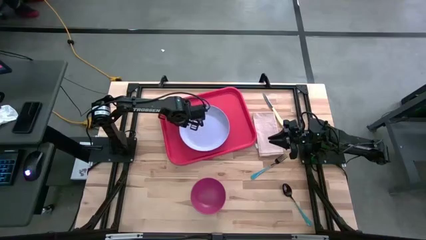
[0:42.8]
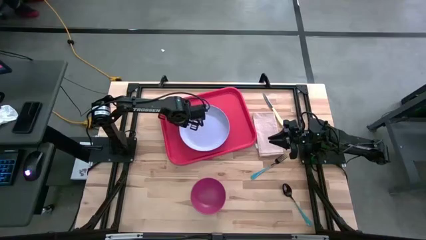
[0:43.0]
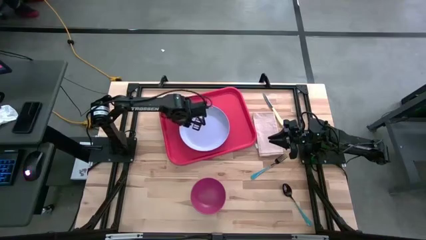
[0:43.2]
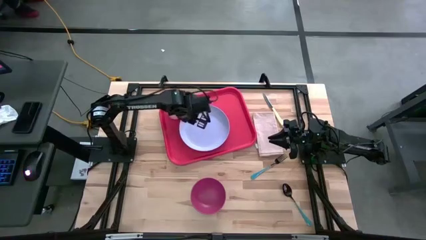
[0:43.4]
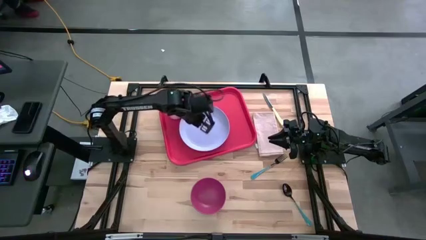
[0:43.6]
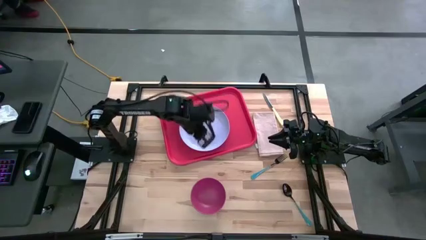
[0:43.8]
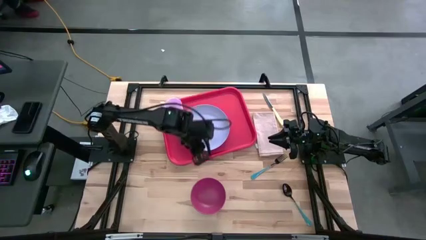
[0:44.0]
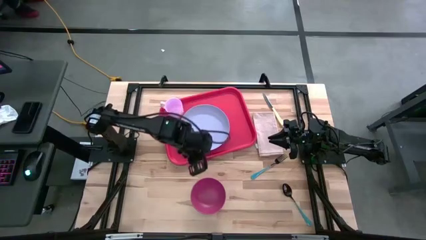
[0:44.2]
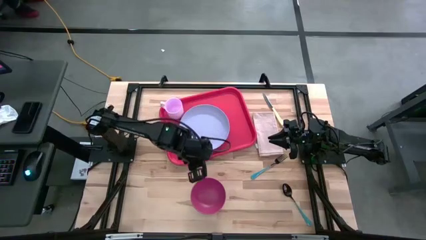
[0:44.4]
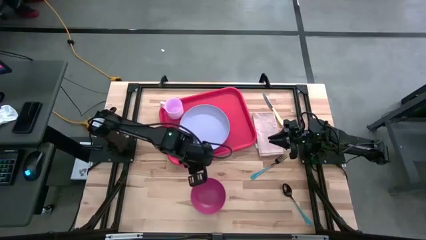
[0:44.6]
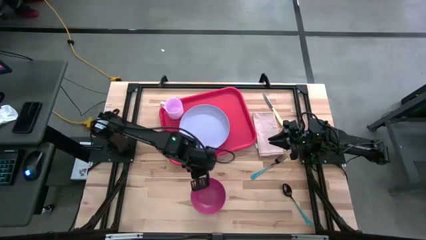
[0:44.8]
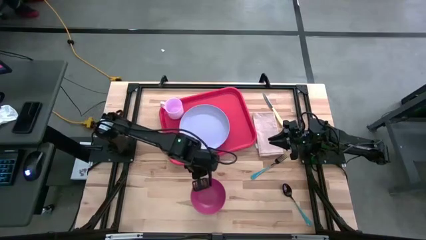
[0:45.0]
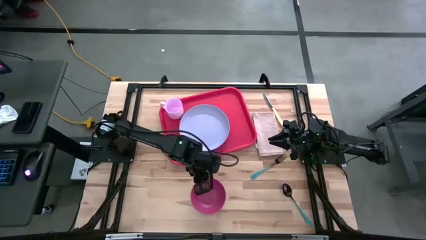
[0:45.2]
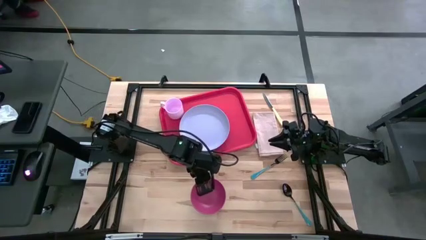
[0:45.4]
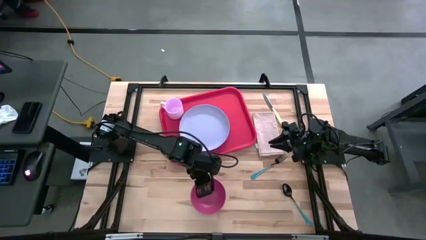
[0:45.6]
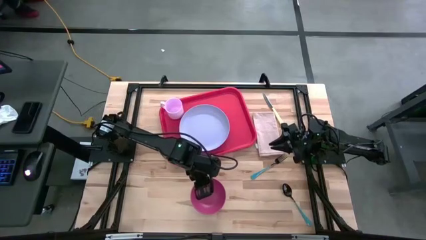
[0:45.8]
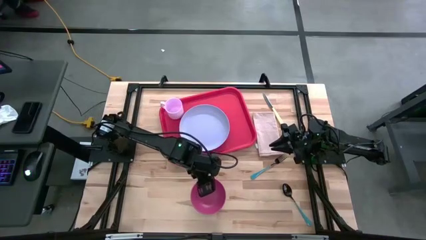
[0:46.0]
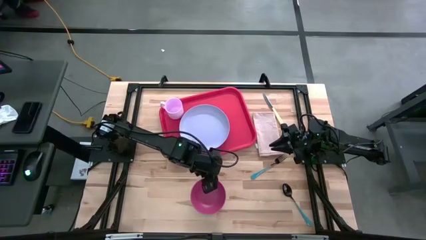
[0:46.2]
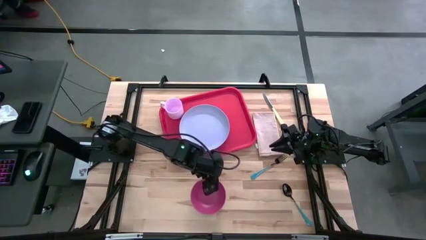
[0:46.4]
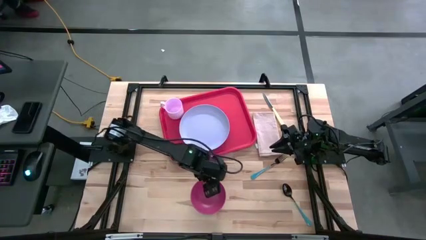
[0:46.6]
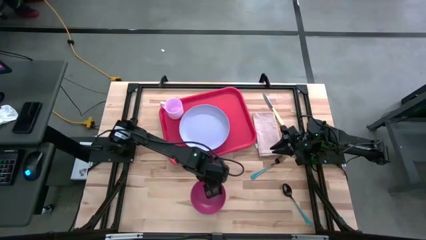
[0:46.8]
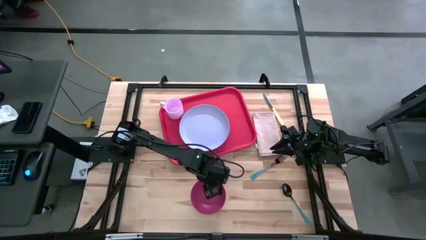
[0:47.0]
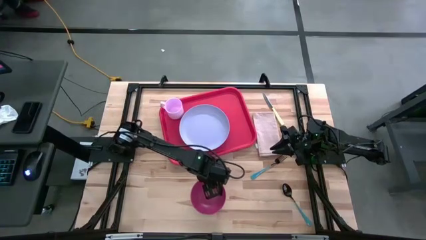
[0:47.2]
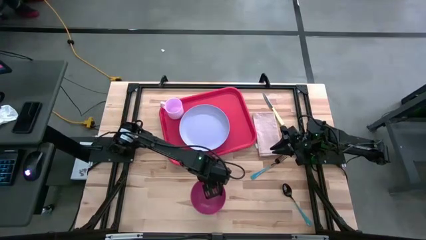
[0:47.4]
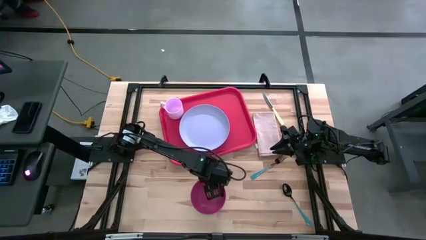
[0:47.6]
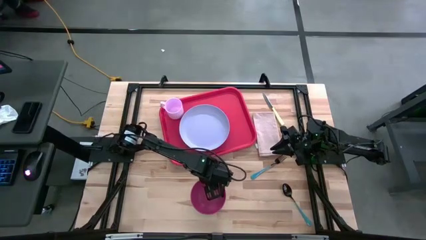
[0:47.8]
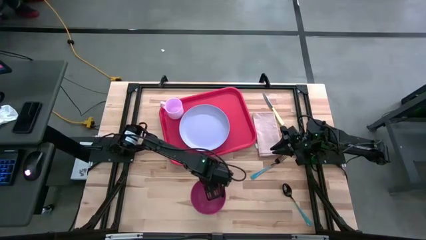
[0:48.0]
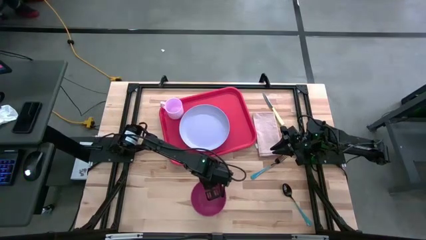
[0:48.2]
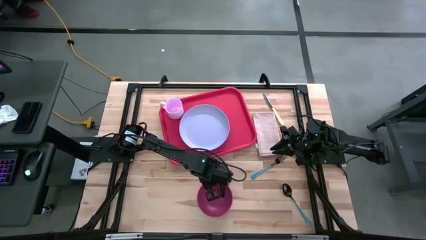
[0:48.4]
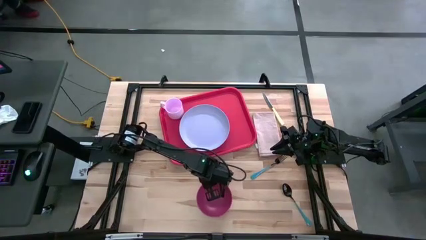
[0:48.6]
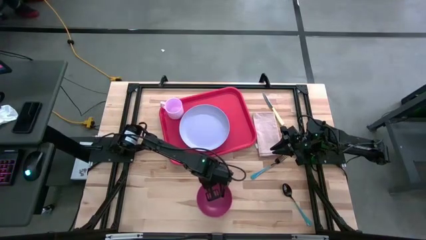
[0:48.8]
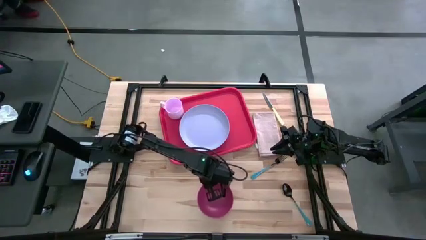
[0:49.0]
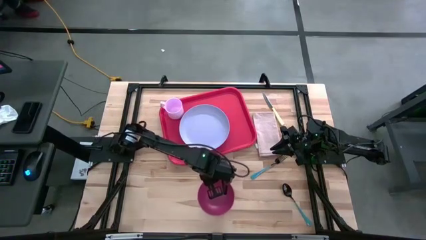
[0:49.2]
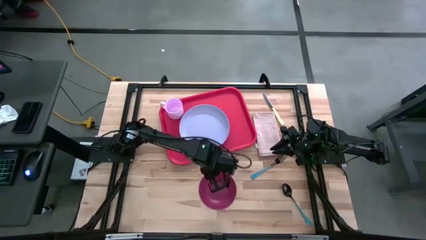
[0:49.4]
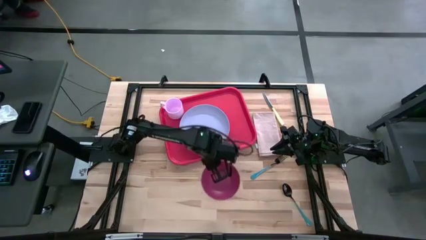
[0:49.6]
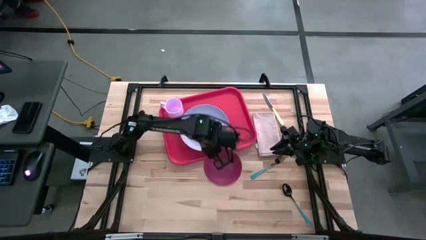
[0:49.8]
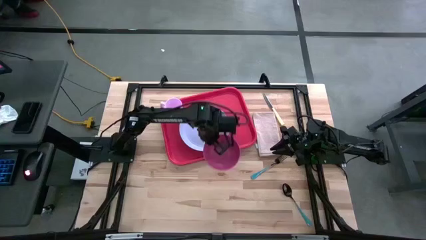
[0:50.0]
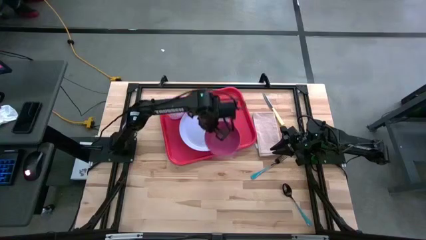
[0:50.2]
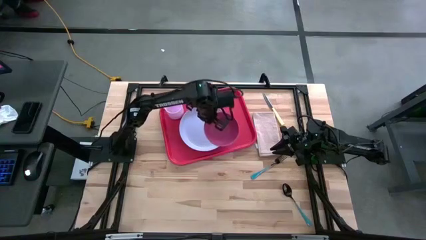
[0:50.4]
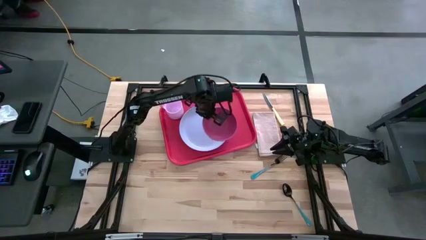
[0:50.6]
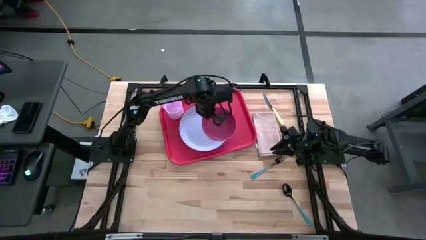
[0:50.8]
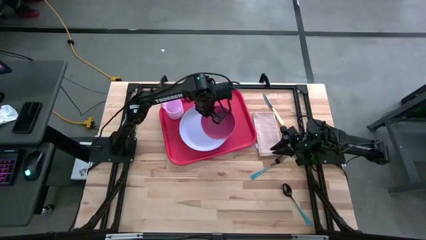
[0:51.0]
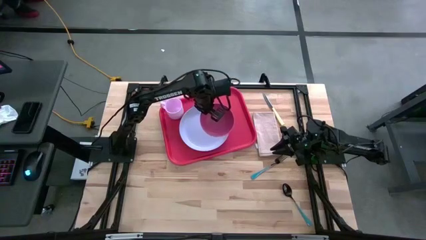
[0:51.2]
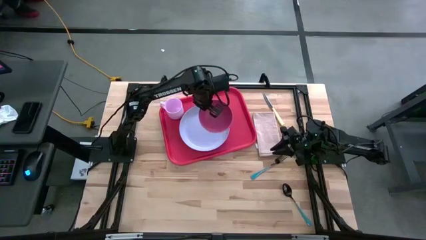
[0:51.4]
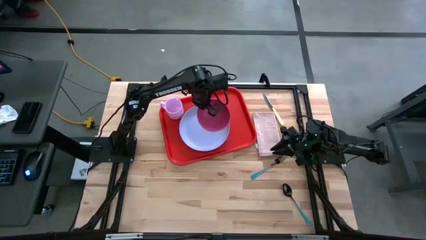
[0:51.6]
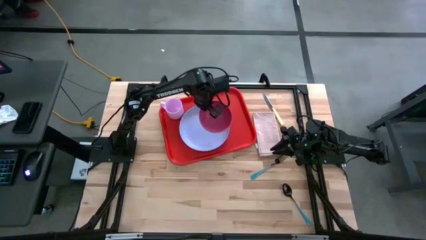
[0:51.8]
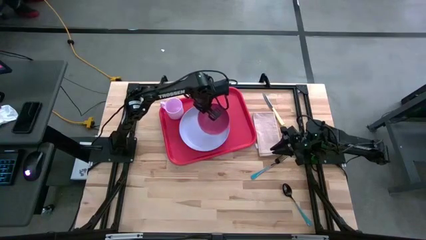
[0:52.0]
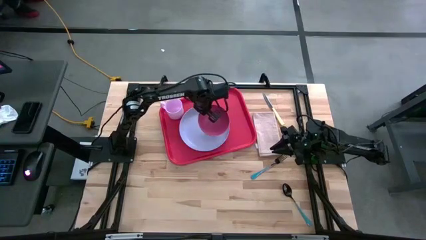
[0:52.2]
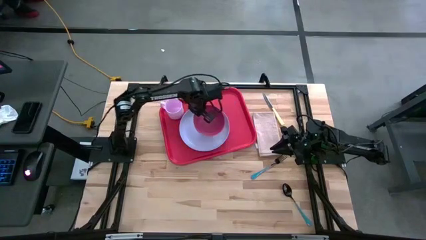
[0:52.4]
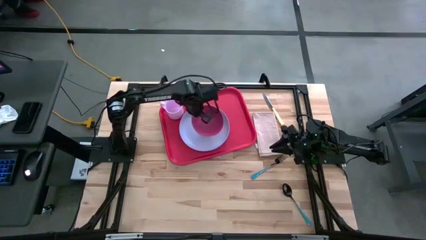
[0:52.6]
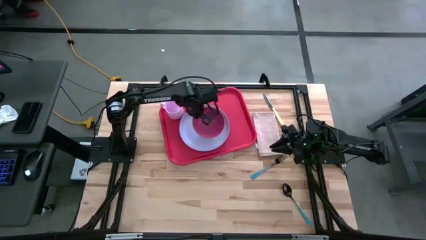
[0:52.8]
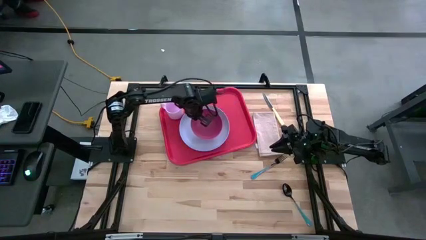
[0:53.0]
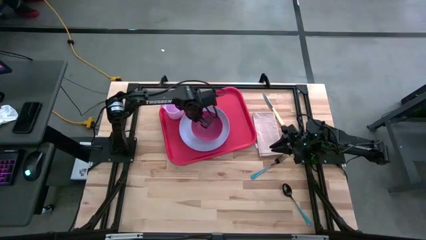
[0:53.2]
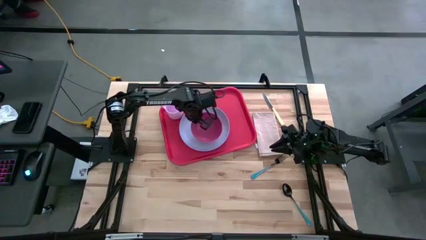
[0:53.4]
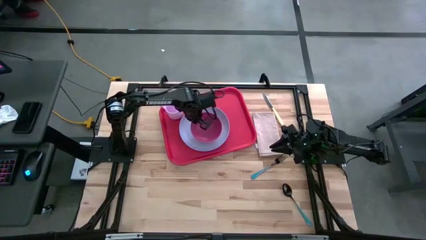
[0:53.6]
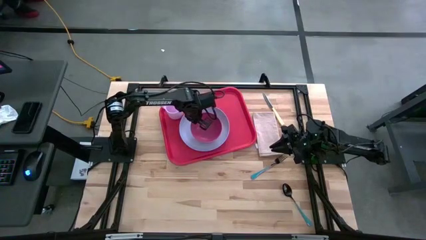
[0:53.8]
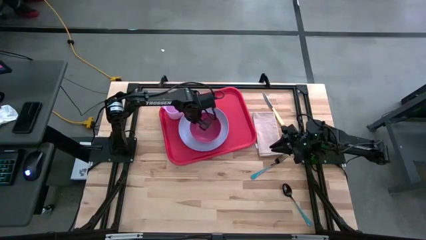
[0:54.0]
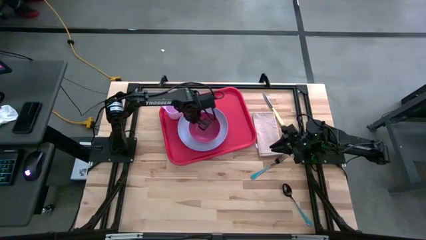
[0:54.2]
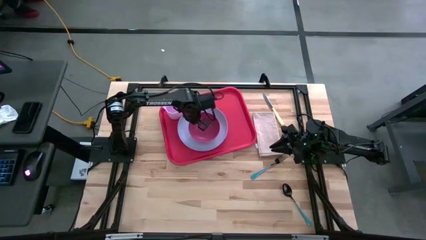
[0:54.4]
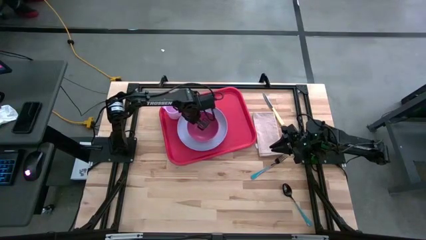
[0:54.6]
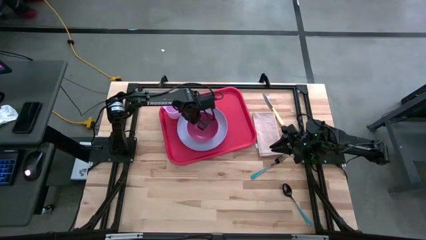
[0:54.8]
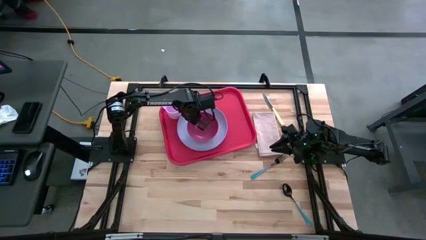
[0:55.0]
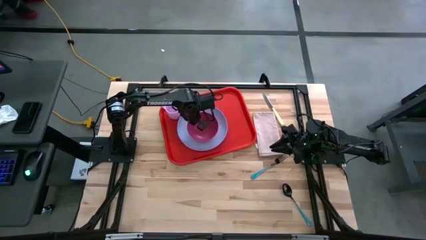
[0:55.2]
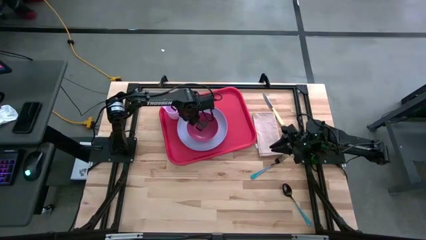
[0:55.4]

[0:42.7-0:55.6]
Task: Set up tray
Stack the pink bowl on the purple plate

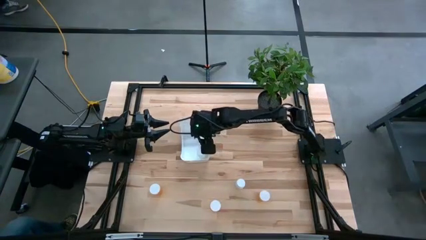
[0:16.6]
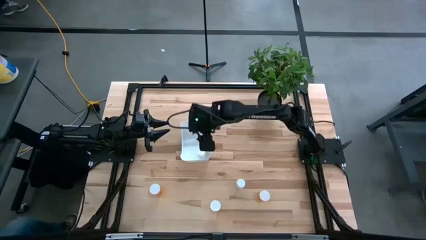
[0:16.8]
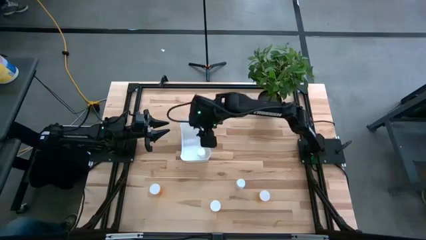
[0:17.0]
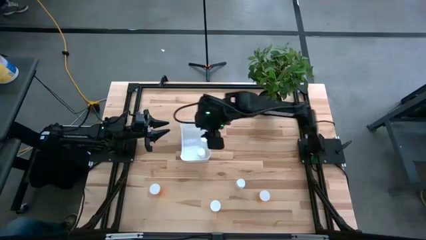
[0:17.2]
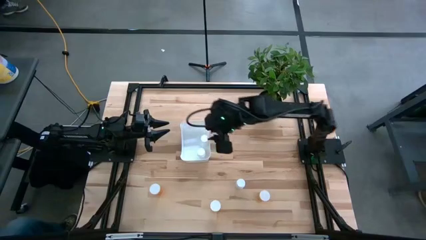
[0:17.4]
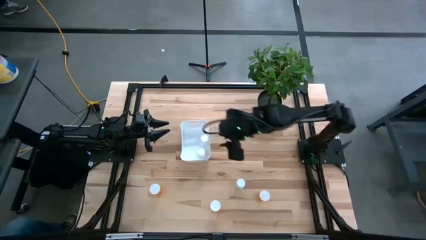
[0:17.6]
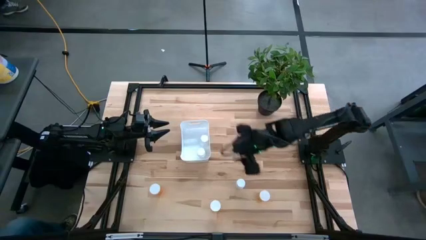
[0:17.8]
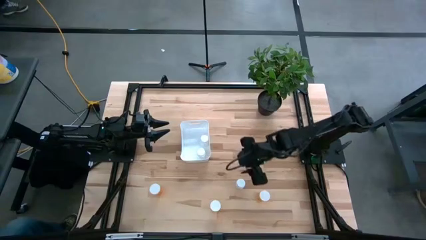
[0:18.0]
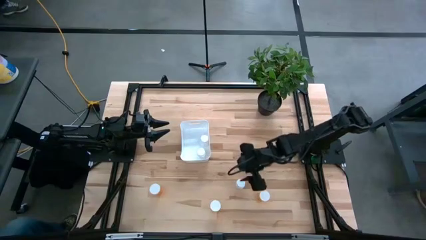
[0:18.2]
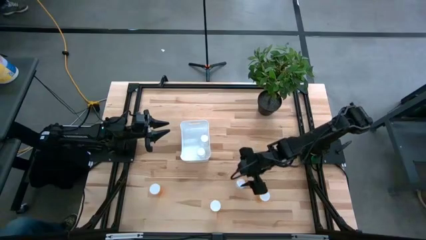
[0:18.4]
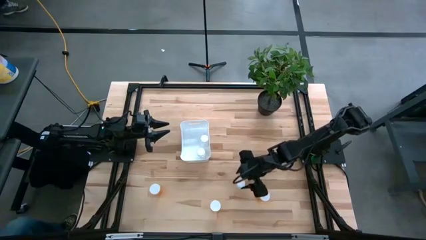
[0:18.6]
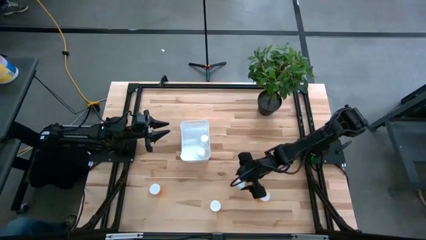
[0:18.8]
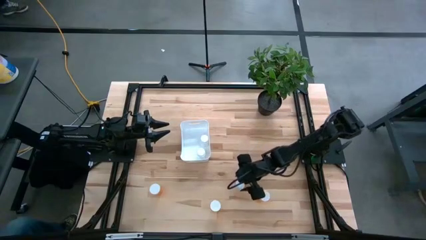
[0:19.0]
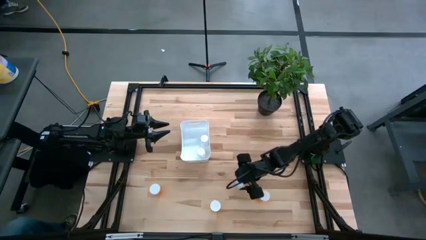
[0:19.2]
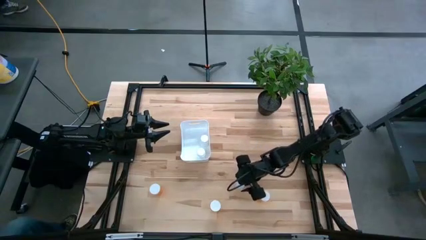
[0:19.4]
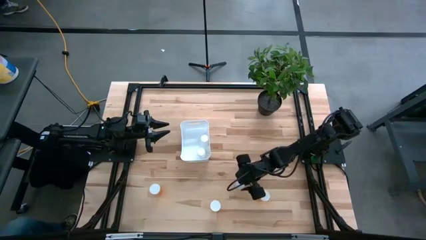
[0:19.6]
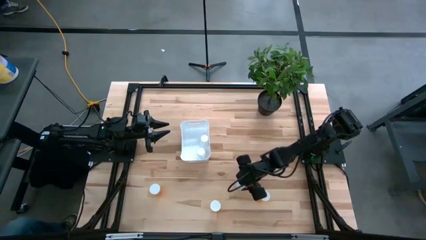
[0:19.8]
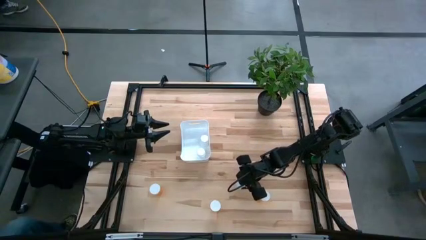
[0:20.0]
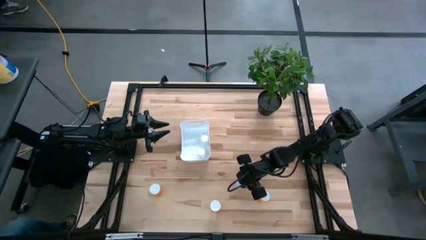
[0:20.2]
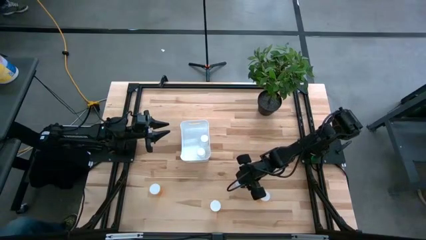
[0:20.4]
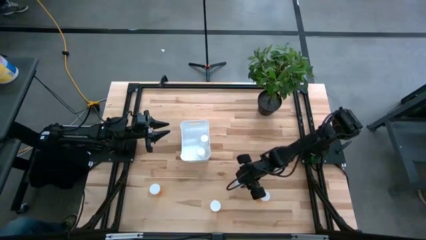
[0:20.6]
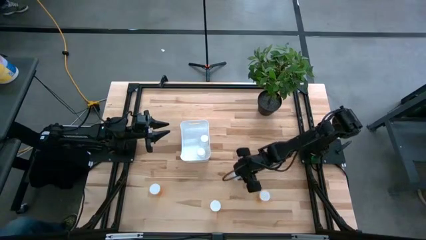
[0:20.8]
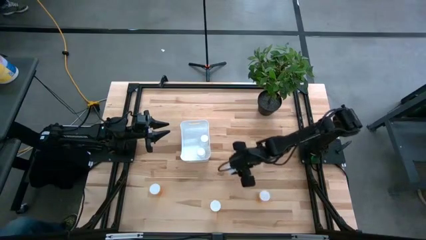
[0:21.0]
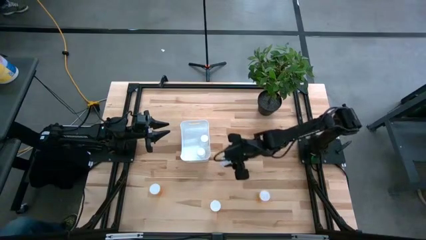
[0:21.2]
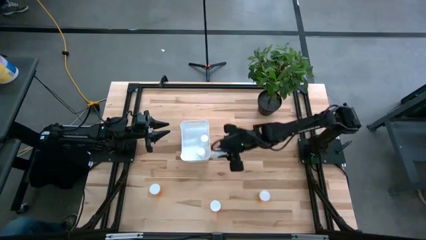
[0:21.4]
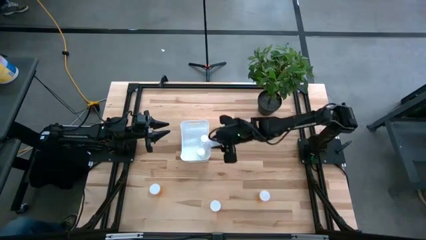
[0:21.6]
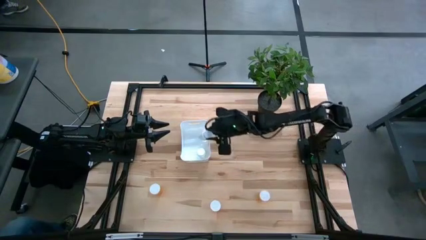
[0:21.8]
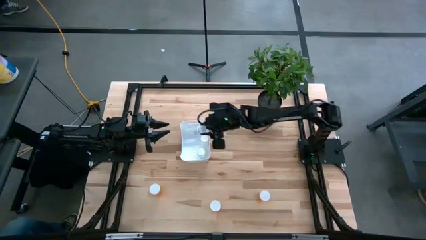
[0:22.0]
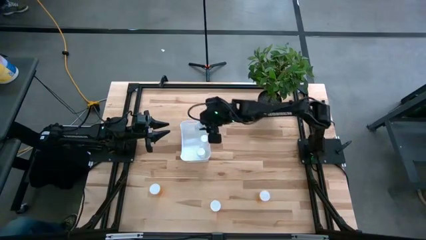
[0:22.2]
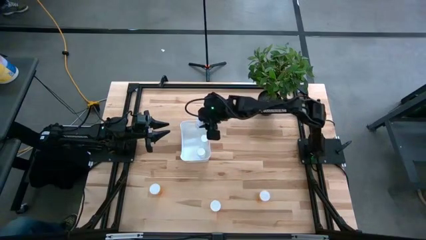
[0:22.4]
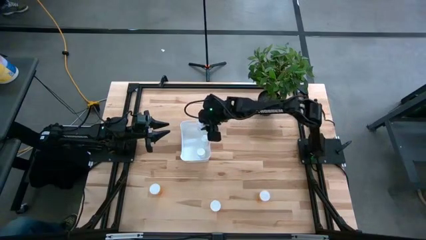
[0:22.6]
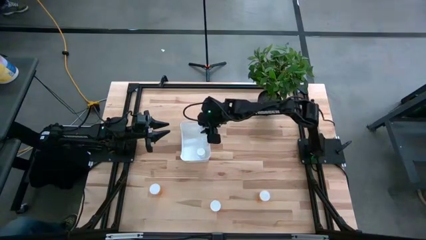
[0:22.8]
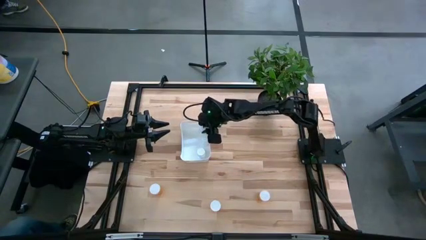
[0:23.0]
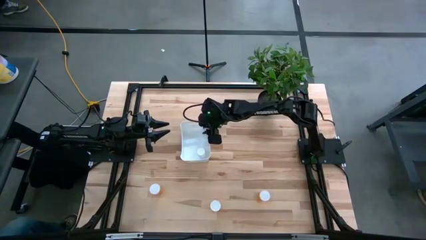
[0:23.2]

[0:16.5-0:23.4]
Task: Pick and place pill bottles into a basket
Put the white pill bottle into the white bin
